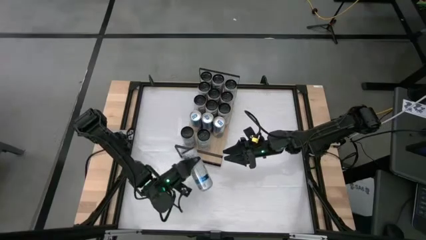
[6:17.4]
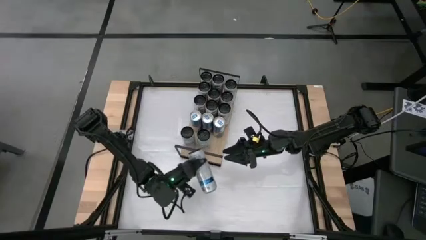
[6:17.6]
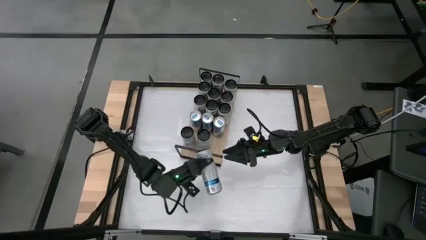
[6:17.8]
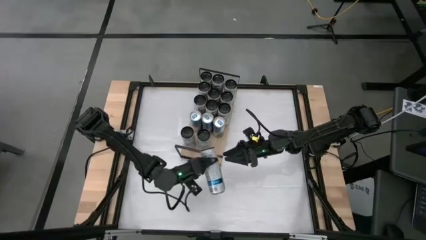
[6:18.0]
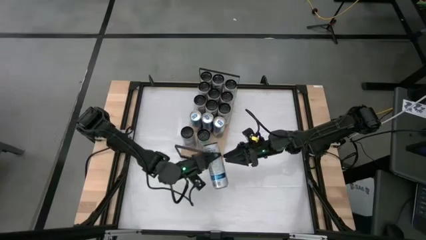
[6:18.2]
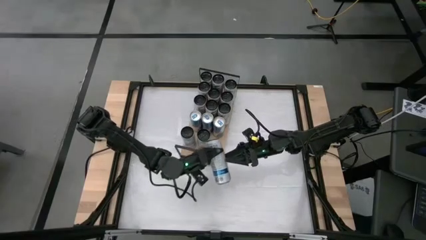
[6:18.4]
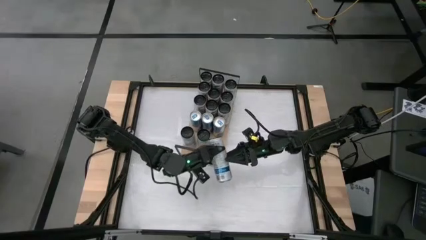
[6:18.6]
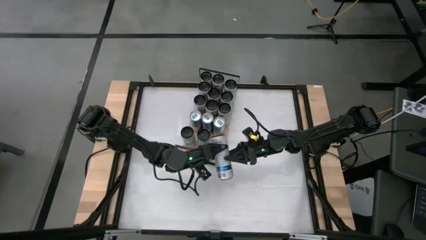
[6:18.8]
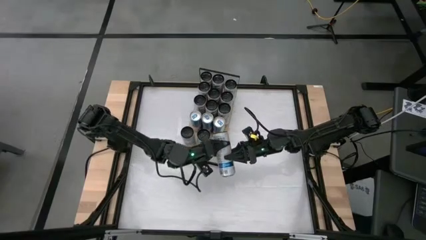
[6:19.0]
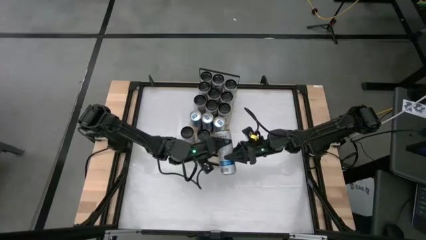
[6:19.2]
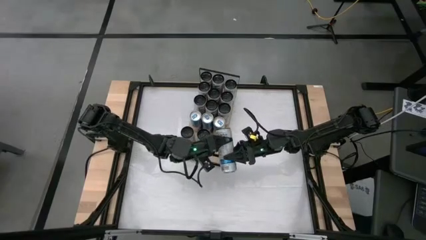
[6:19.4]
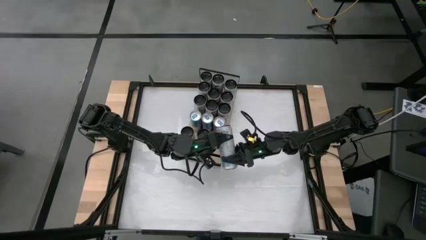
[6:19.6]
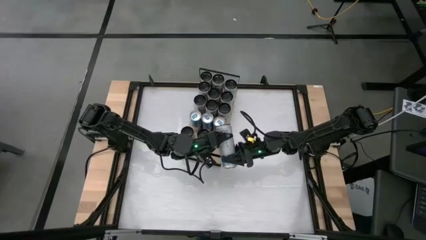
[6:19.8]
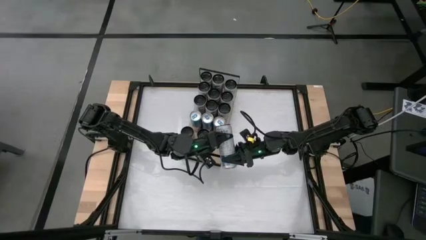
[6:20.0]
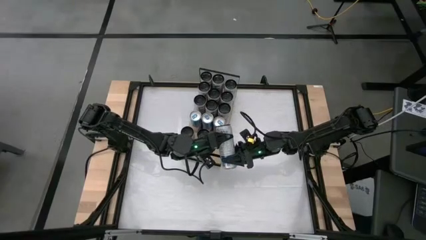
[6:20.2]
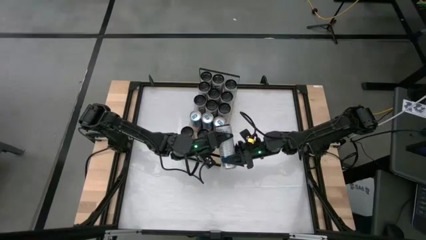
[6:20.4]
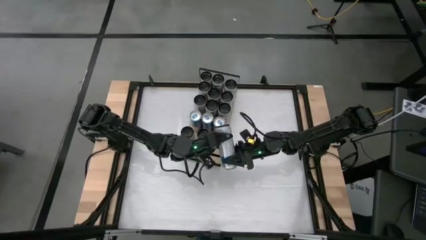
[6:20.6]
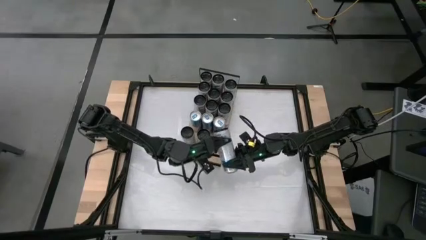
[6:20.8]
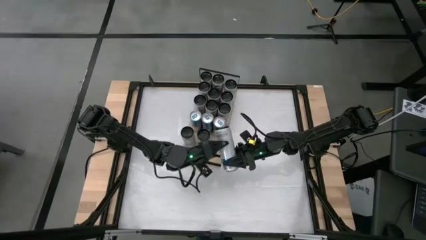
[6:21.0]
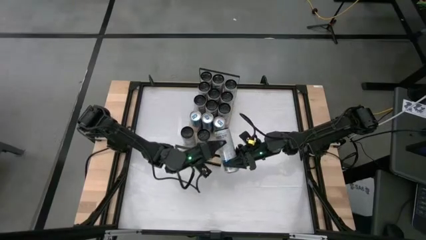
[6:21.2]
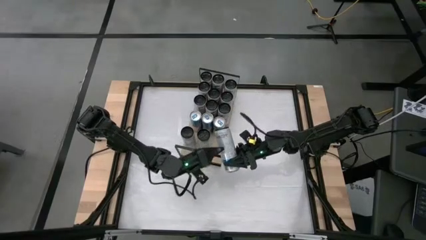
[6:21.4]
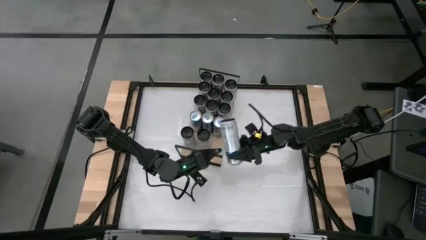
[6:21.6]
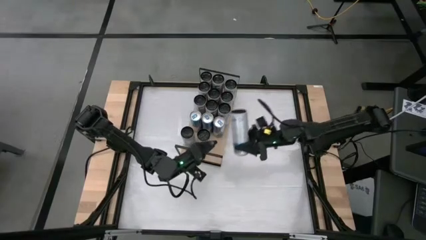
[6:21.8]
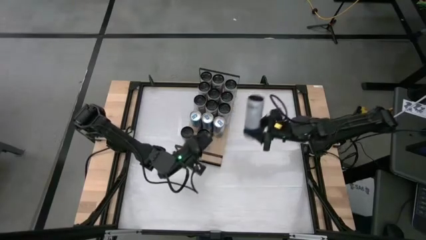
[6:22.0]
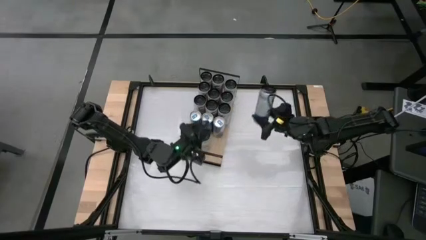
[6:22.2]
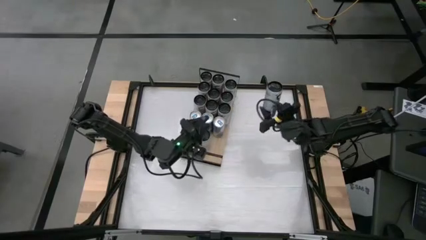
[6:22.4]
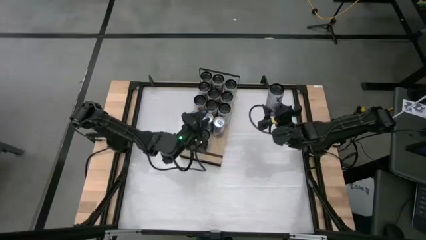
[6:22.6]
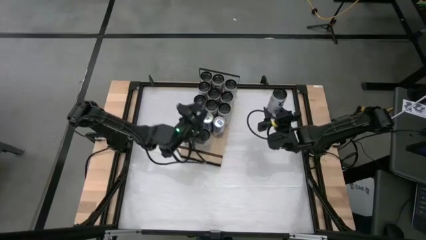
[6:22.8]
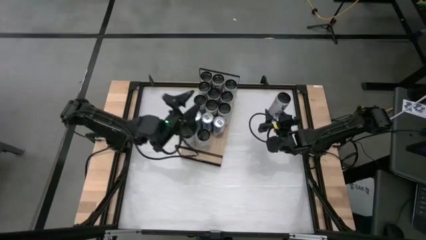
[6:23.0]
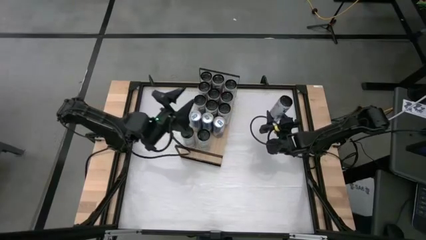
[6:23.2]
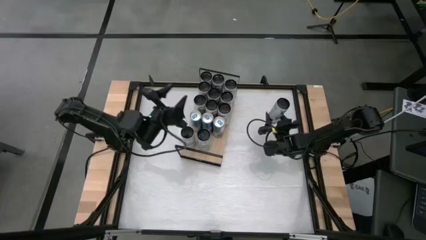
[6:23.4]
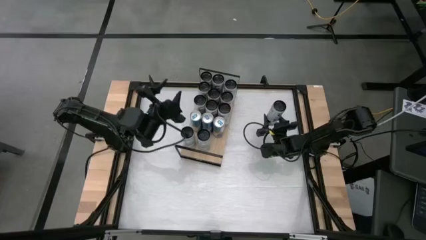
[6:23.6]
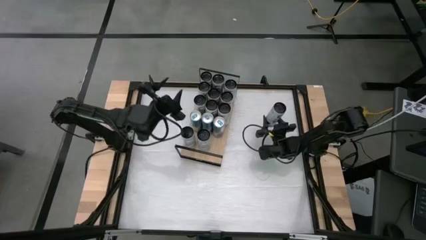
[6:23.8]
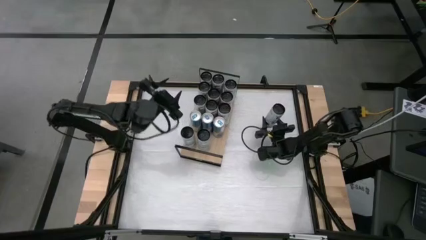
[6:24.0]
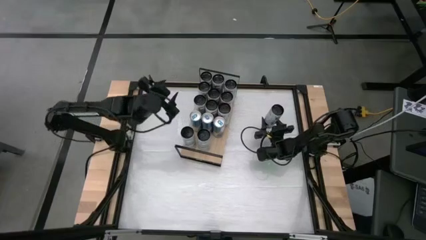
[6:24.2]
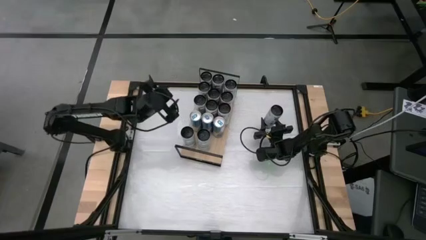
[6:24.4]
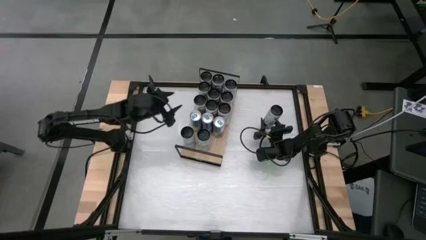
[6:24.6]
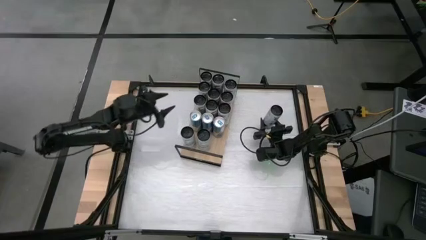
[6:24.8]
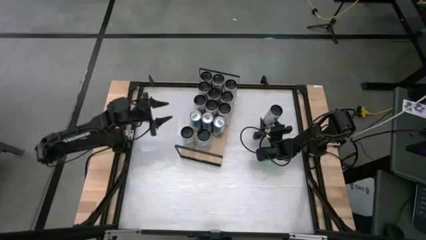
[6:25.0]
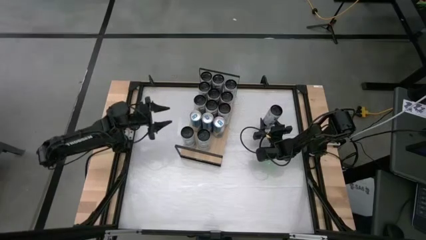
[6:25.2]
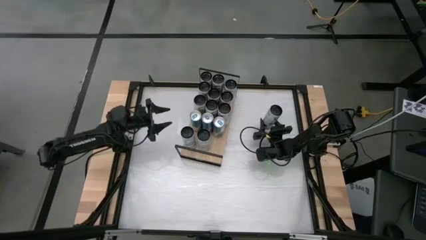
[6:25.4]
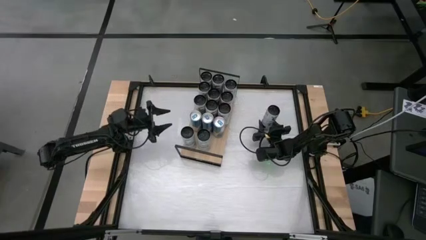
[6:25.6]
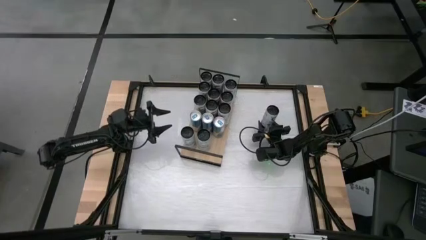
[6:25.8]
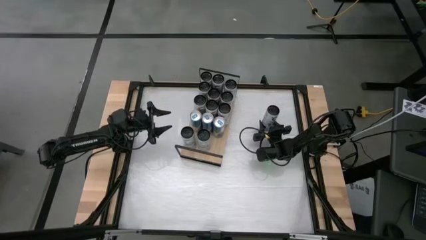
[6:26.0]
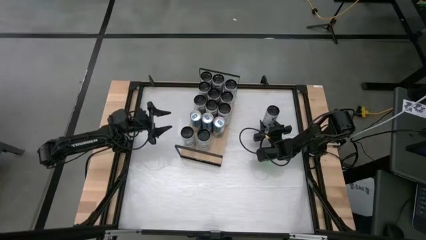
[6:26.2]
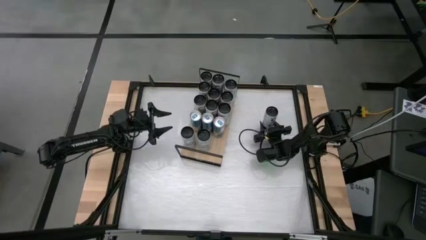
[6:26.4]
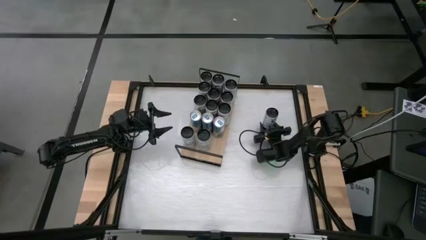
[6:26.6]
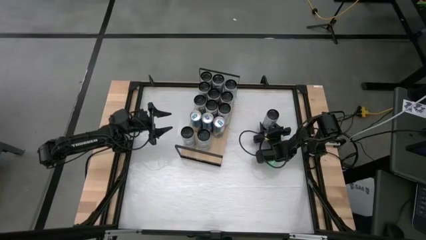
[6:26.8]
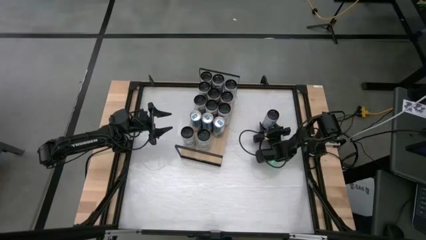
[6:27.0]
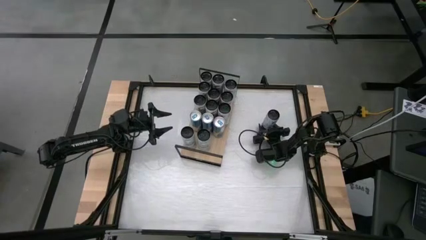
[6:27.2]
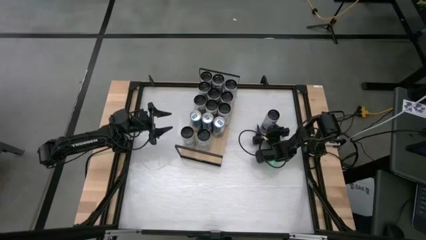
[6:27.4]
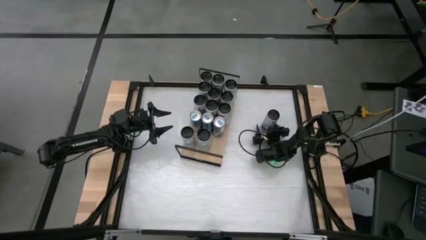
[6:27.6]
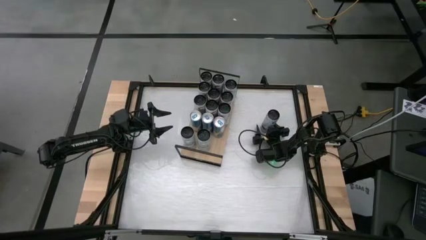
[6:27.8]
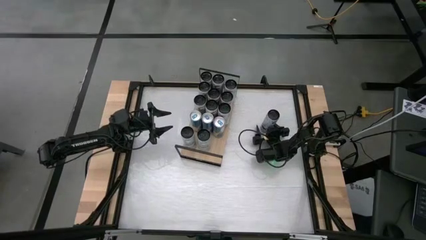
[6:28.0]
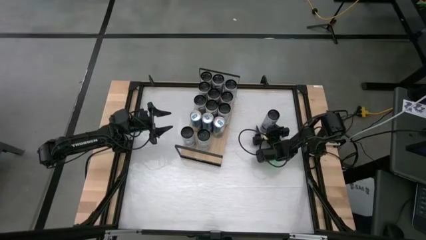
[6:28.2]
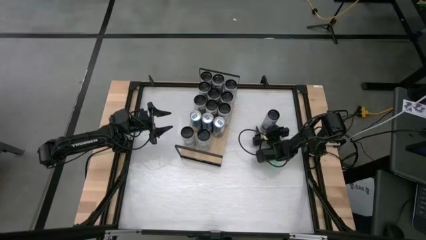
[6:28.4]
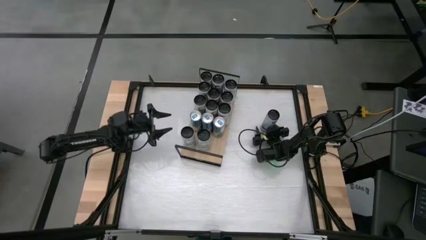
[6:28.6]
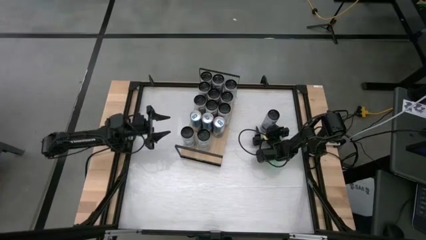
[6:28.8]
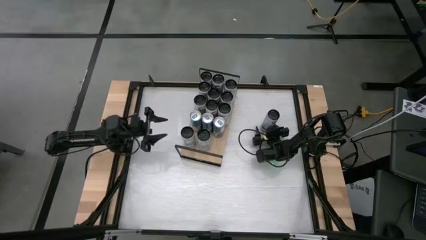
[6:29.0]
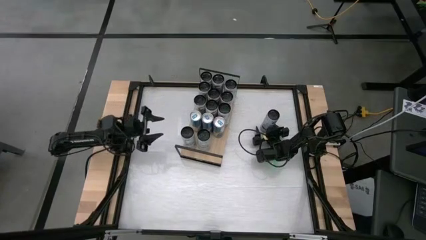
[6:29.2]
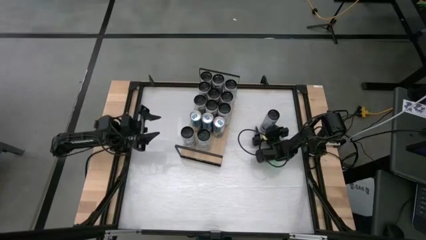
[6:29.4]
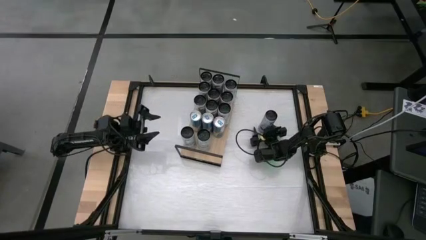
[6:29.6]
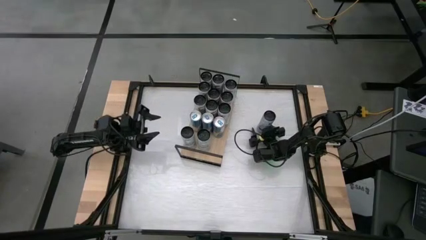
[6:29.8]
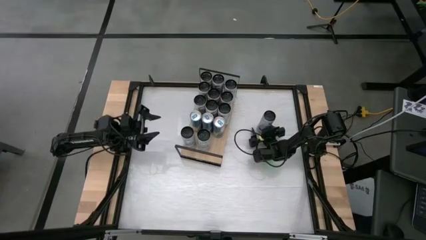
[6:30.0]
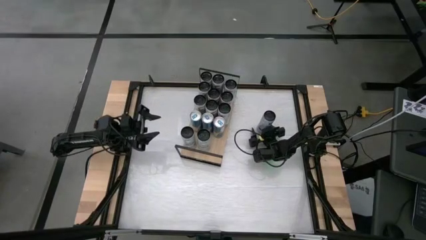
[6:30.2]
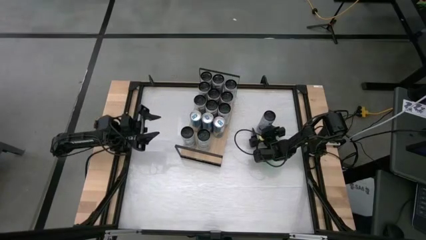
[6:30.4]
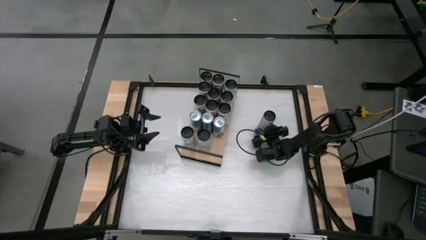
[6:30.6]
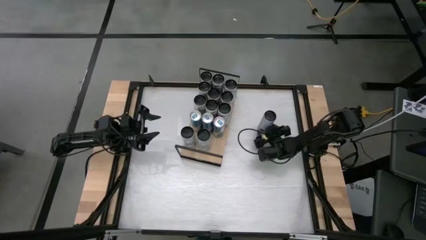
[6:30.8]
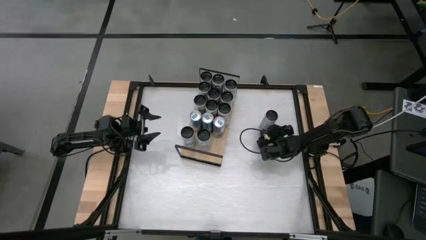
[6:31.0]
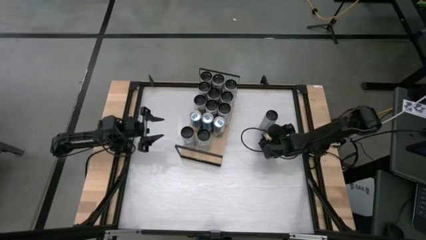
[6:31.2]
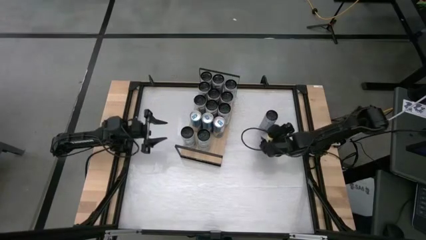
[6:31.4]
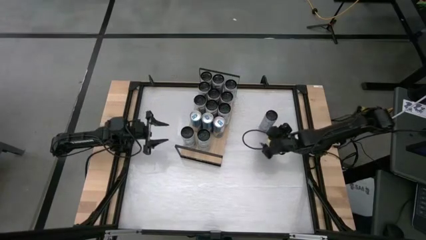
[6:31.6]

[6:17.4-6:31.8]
Task: Place canned beverage on shelf
Move the blue soda can to the top right of the table
